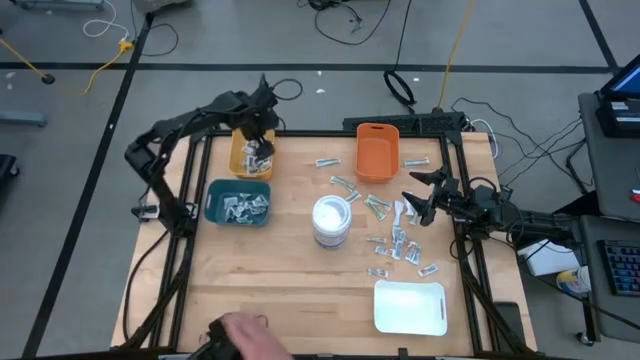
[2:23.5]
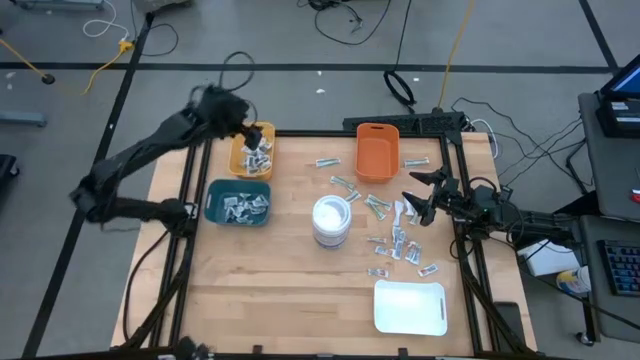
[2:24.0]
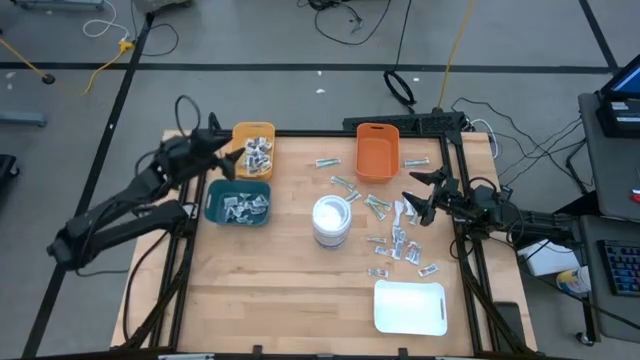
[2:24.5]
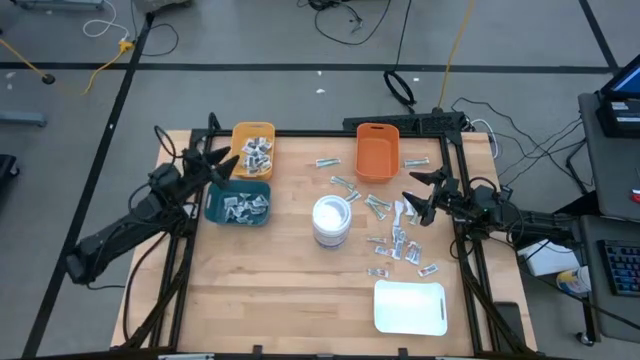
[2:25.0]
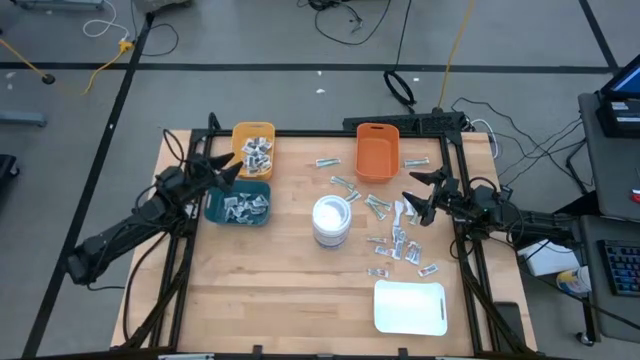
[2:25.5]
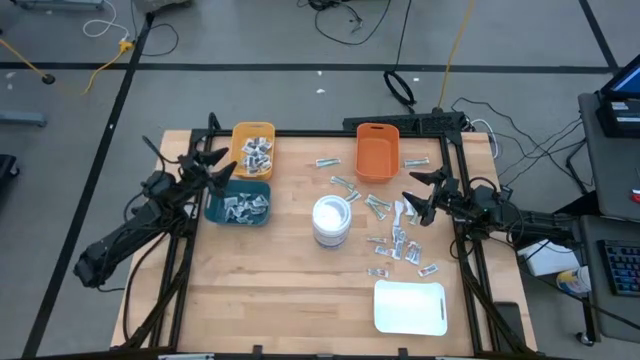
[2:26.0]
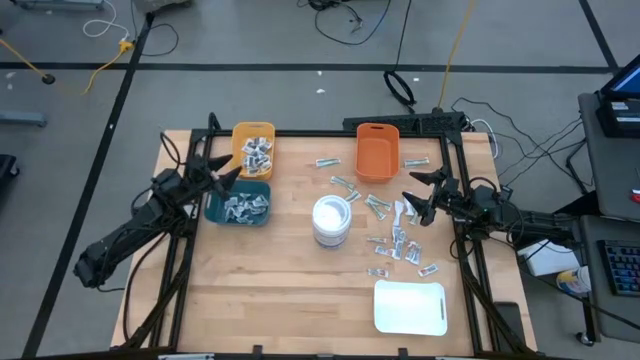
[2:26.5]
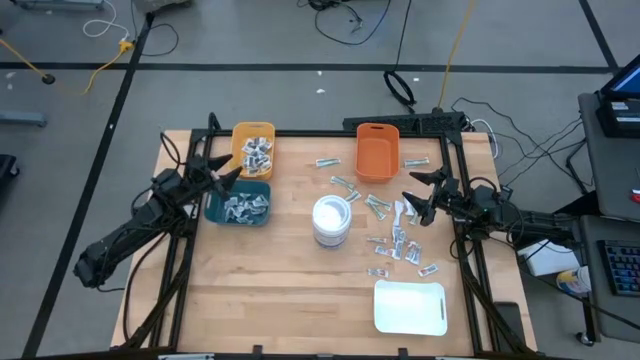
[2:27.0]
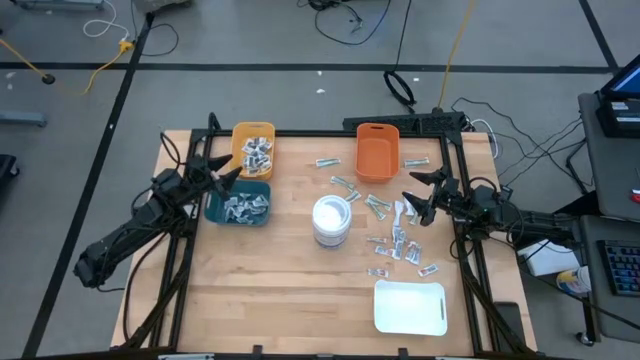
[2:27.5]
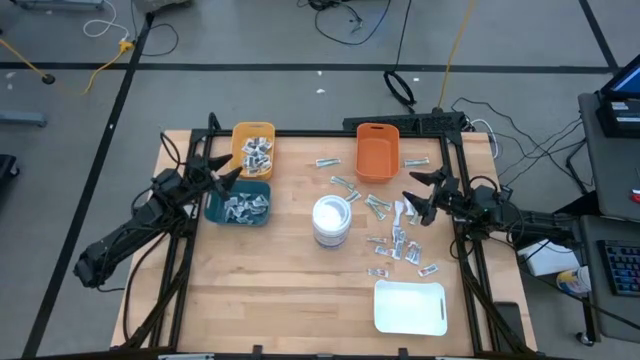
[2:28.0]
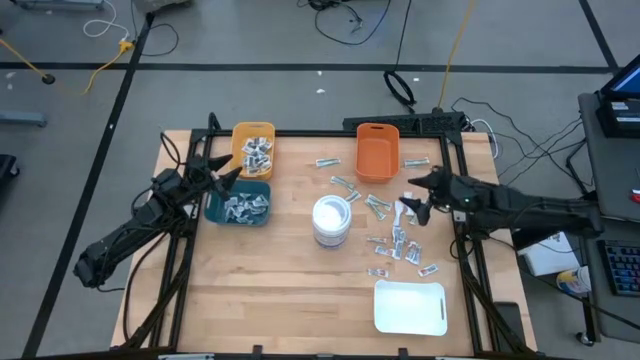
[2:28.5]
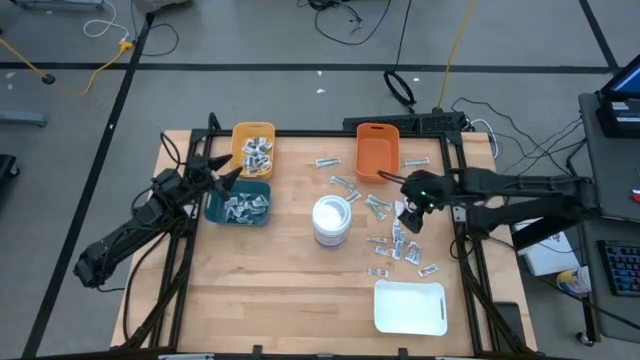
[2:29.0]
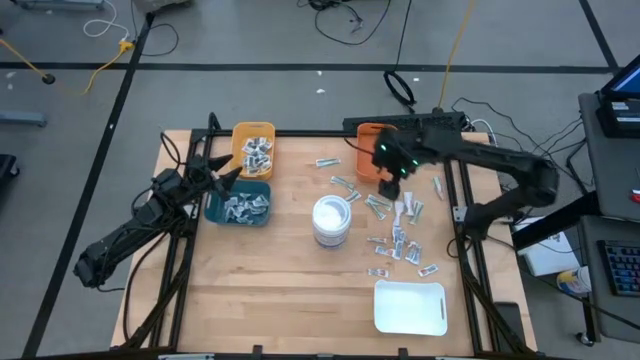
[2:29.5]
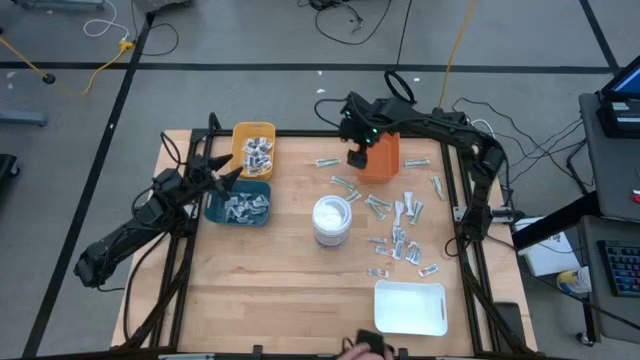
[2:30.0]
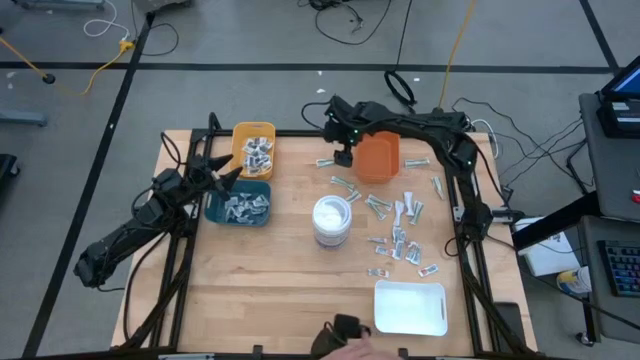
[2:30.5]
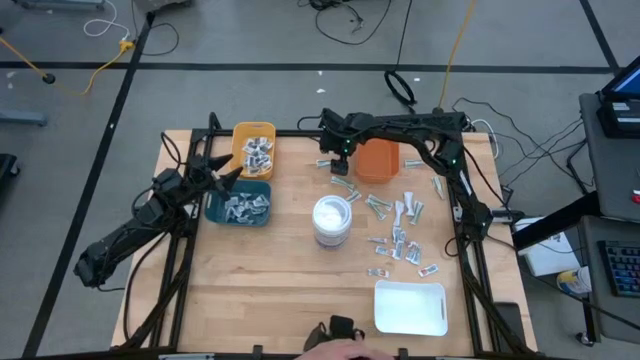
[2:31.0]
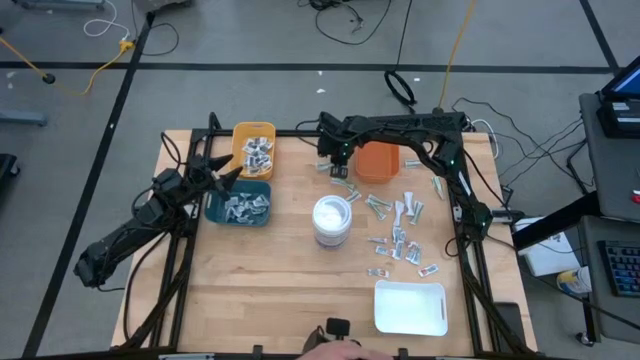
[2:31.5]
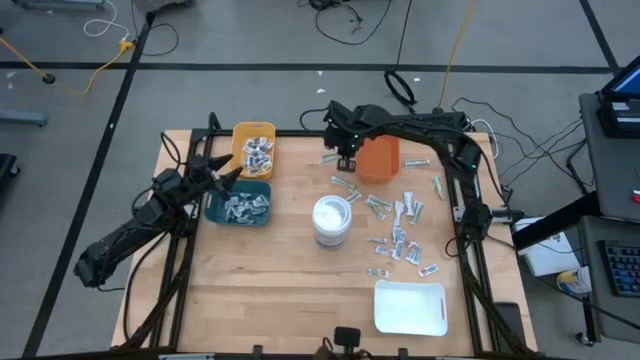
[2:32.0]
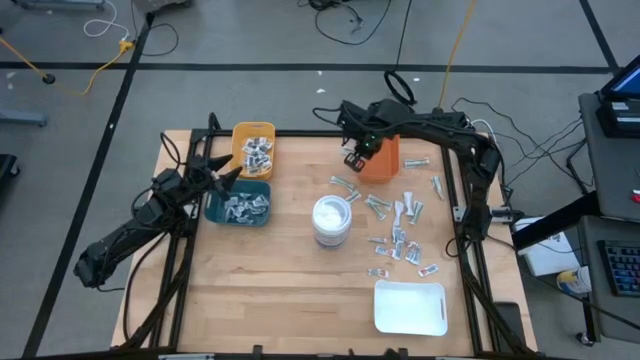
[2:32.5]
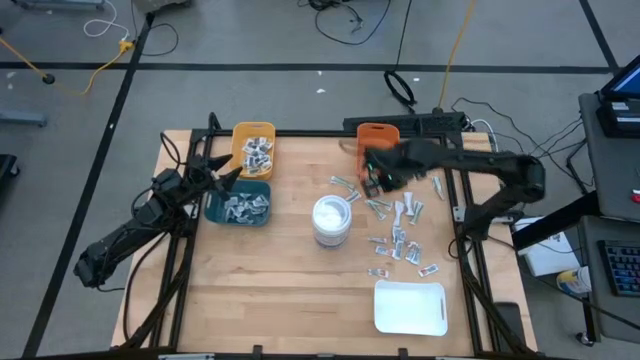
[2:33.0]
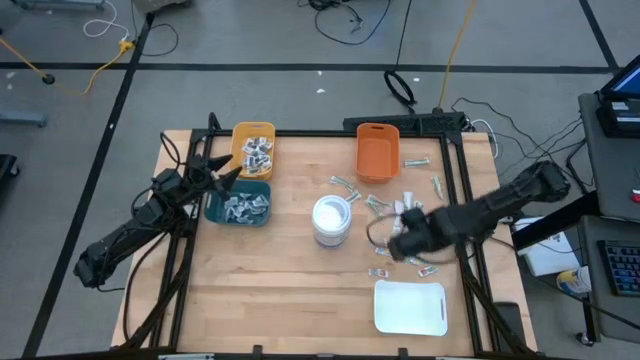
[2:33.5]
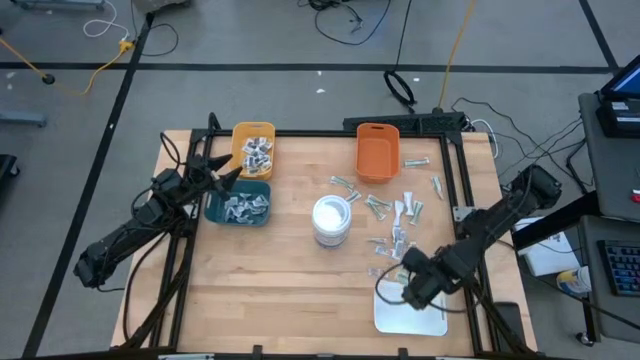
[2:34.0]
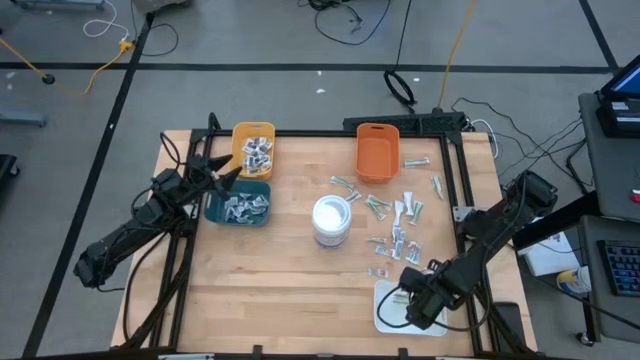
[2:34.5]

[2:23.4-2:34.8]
Task: Pick & Place First Aid Supplies
Put the green bandage into the white bin

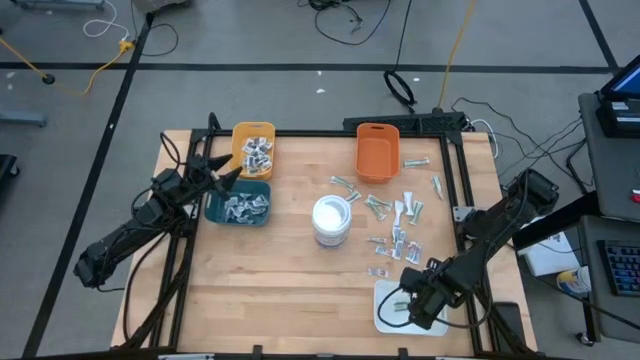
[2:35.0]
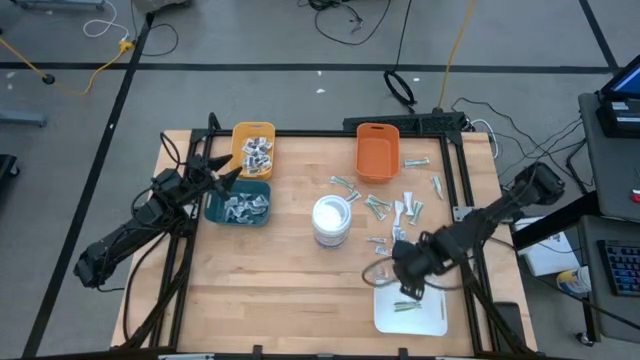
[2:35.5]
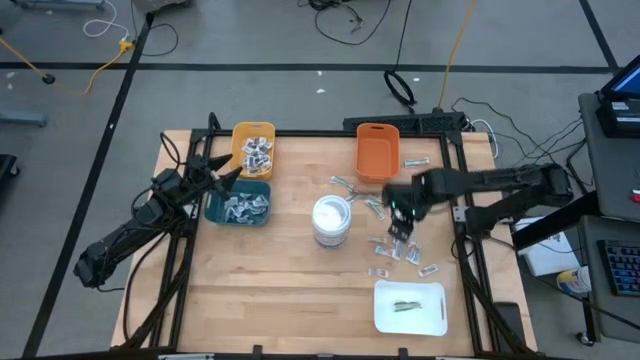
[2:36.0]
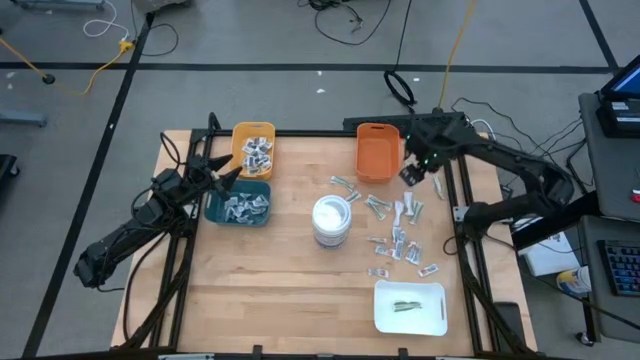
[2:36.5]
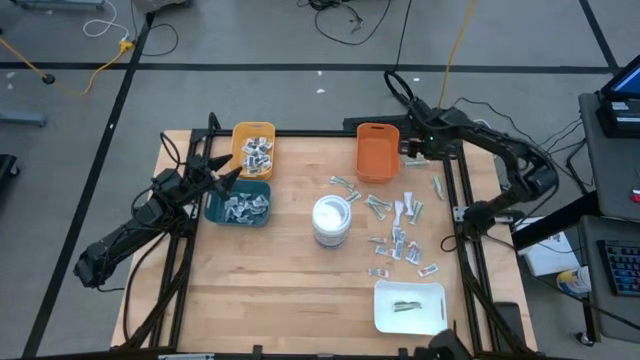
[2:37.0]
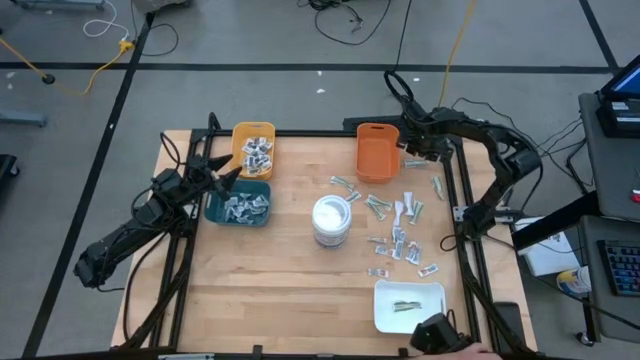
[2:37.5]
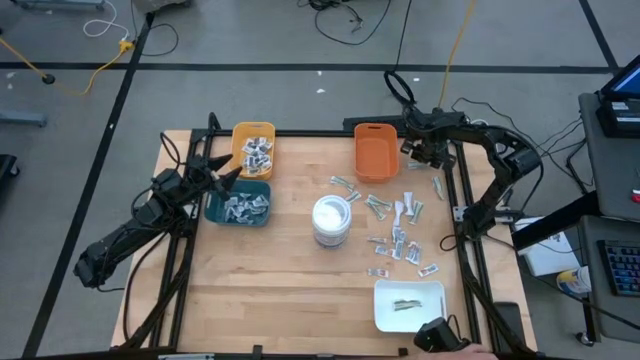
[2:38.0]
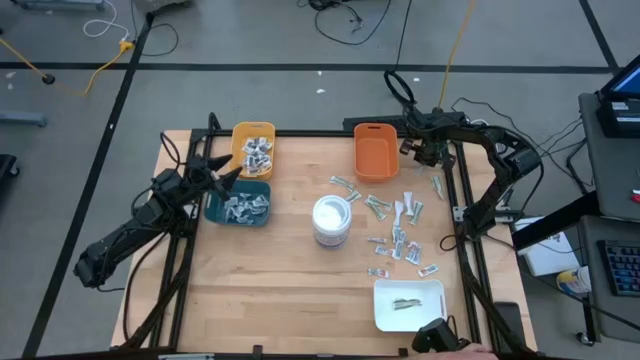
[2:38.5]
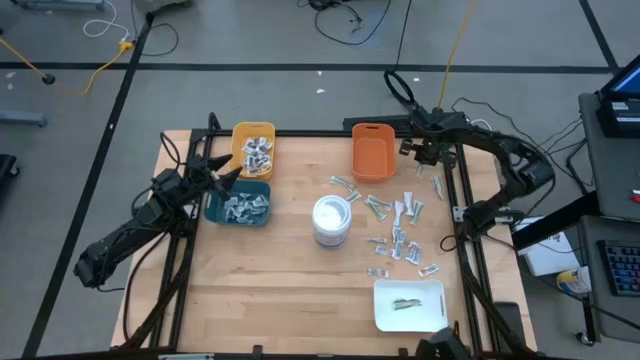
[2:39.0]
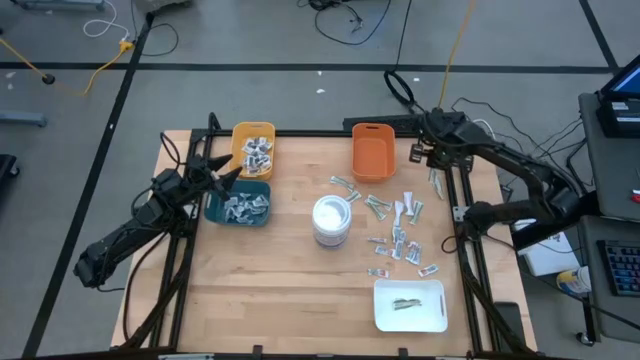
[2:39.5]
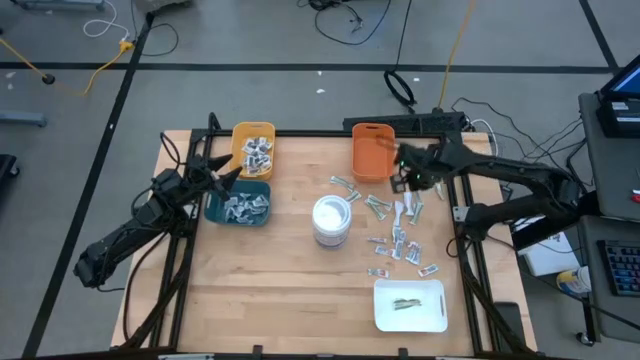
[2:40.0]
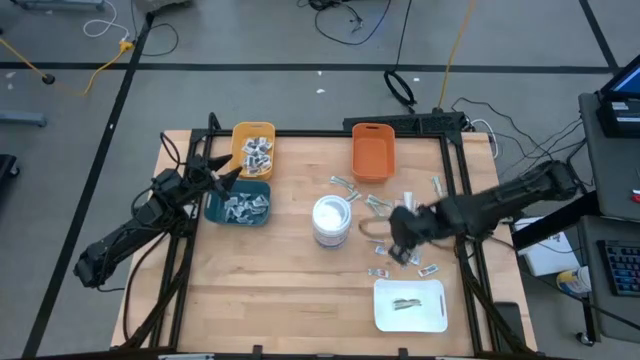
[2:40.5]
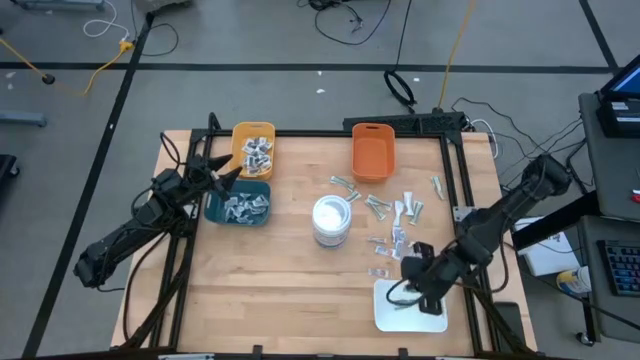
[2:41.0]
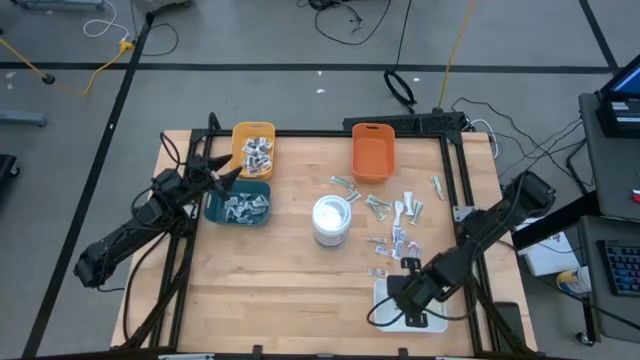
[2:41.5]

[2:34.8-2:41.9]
Put the green bandage into the white bin
